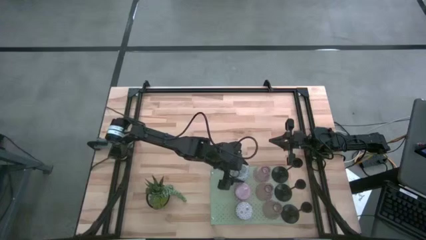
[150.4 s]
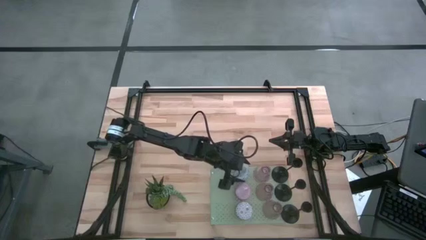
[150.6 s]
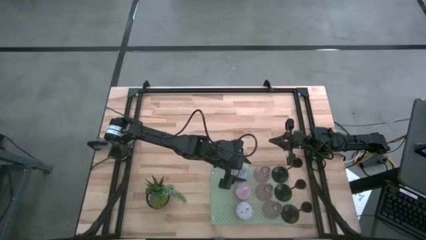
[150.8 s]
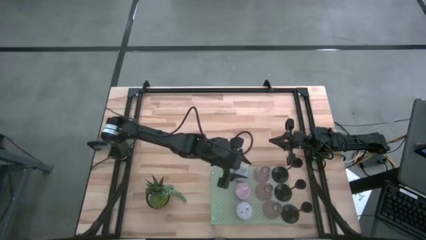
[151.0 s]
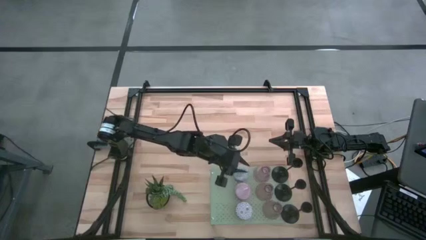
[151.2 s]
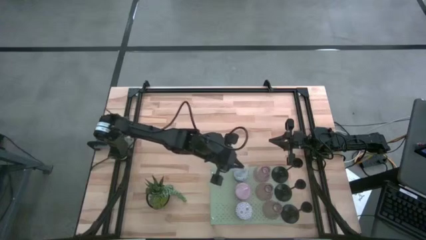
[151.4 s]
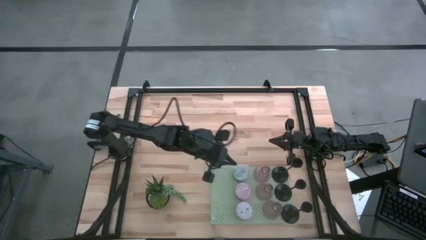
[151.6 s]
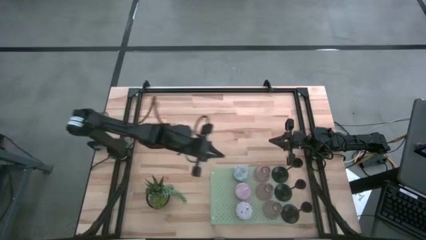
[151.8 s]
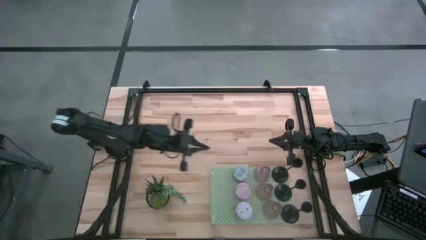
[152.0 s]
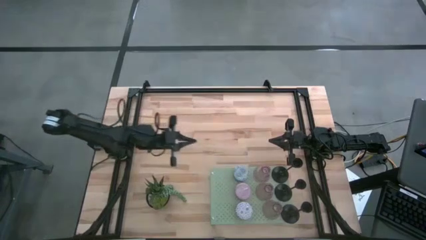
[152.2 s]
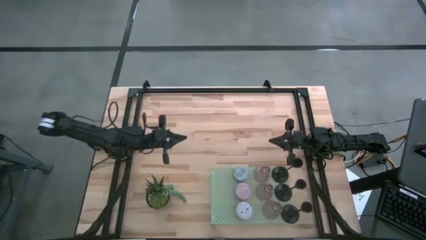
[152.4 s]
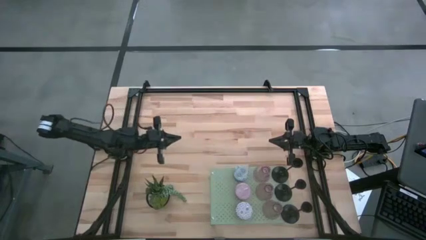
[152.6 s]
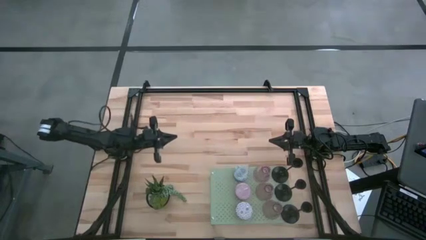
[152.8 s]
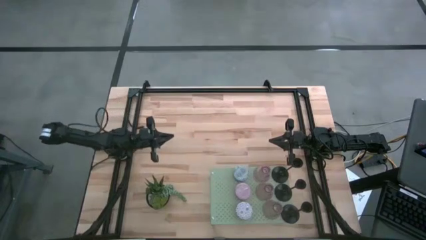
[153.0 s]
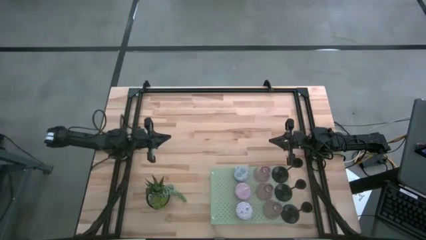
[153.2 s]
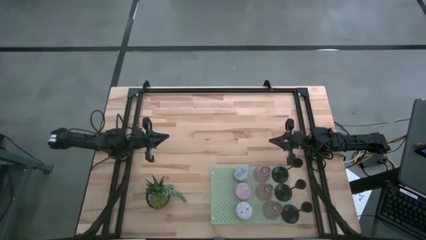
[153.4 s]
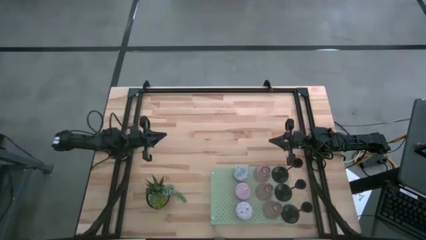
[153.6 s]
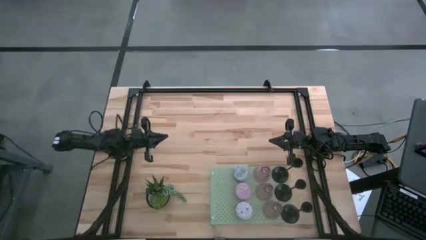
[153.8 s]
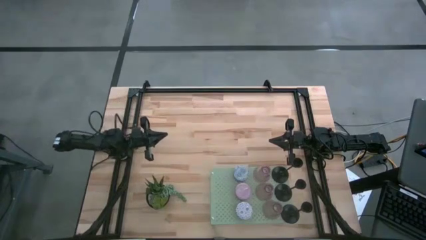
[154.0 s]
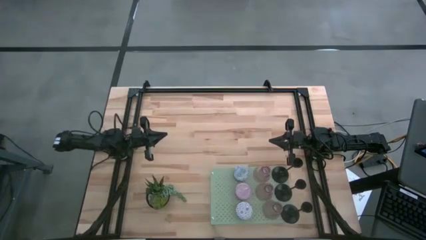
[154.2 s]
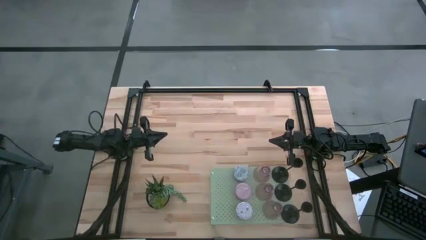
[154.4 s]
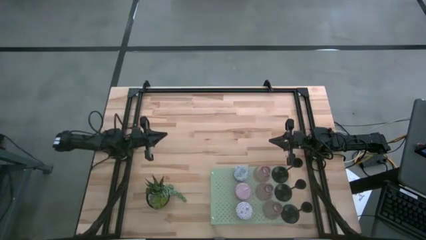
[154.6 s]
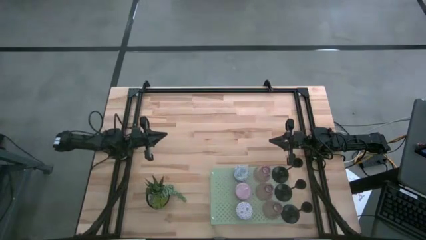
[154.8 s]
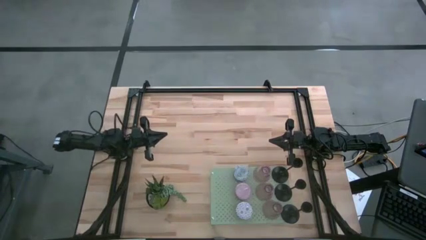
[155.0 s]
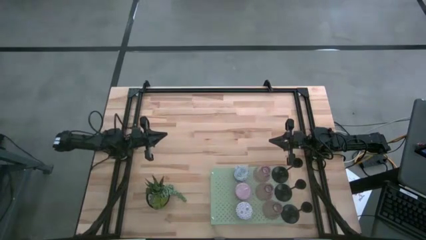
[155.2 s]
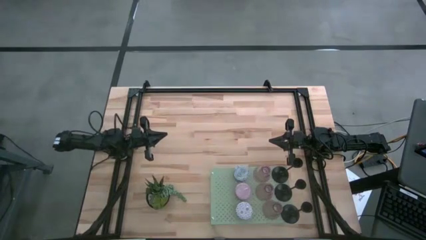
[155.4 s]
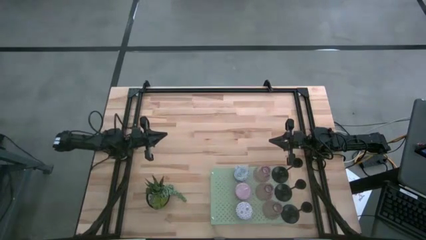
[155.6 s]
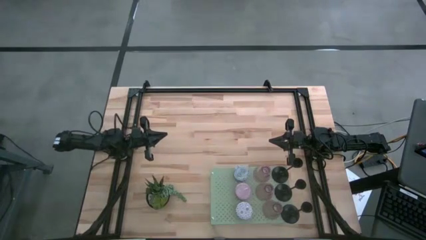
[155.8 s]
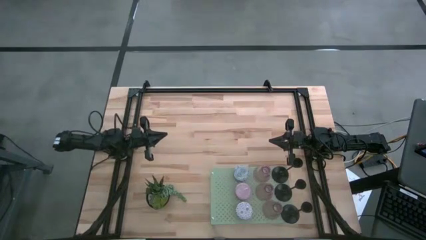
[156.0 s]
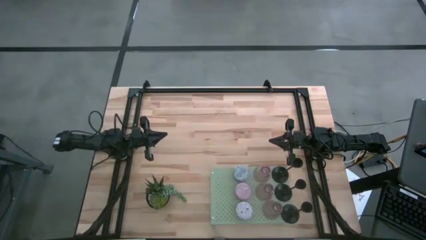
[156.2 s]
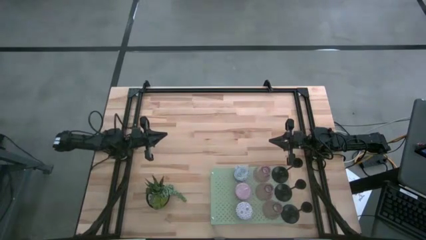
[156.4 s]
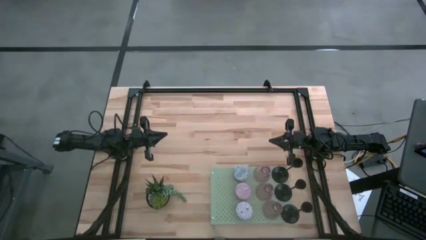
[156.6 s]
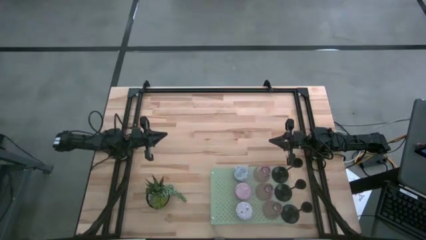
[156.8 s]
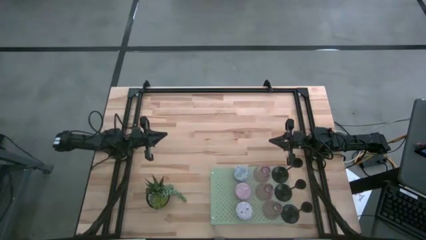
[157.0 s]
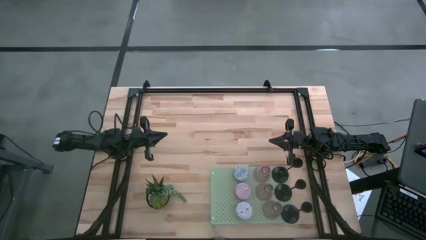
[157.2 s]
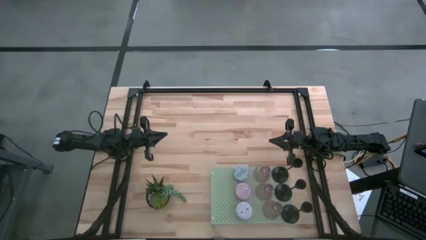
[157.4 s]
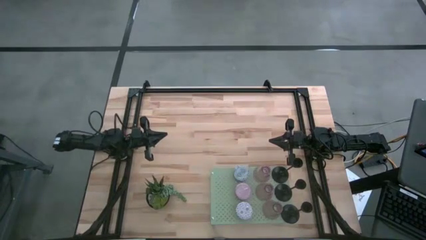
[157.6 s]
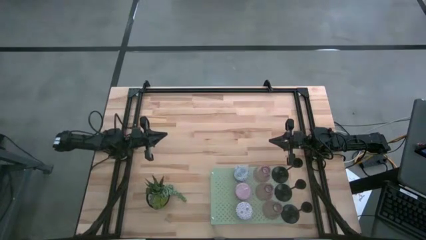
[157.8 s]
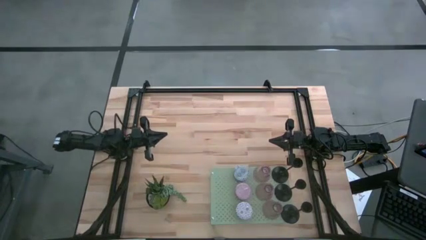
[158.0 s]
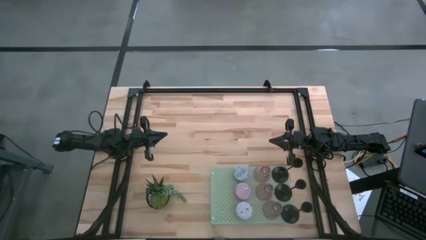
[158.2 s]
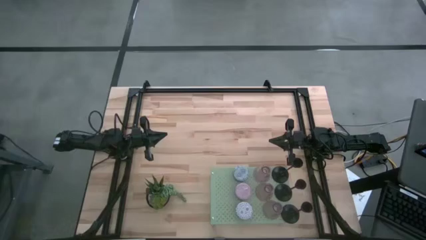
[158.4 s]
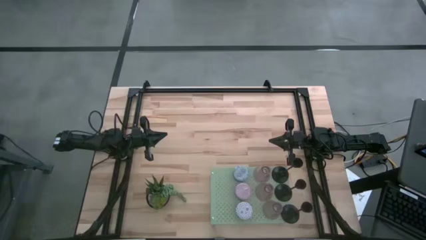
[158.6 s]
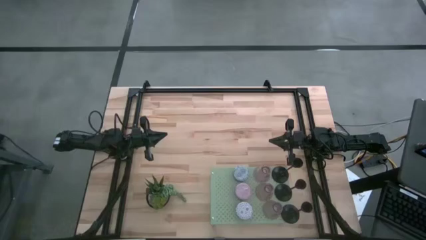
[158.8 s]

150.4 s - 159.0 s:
Task: Pick & Place candle stick holders
Return to Home Position

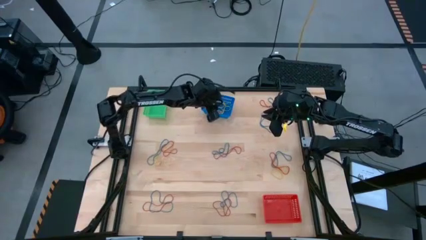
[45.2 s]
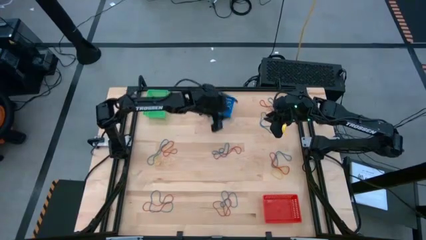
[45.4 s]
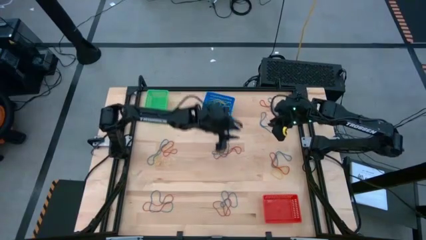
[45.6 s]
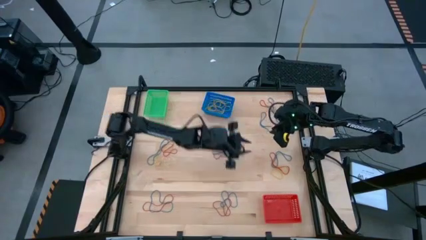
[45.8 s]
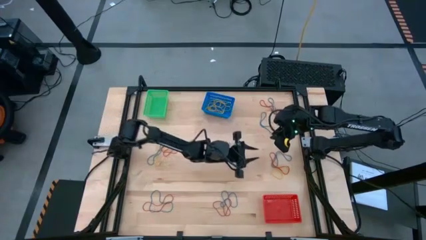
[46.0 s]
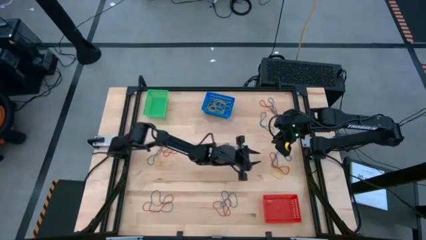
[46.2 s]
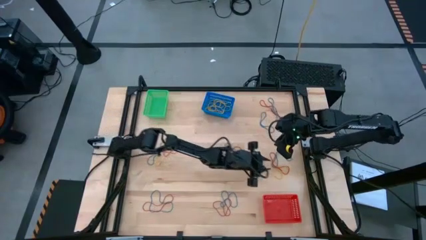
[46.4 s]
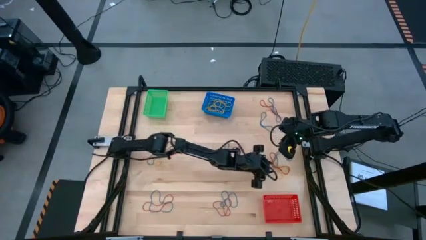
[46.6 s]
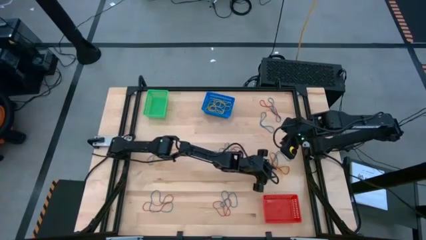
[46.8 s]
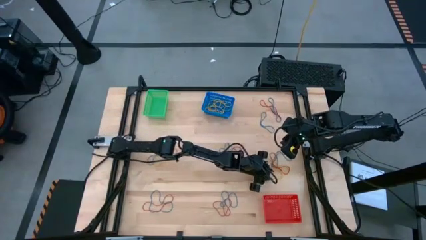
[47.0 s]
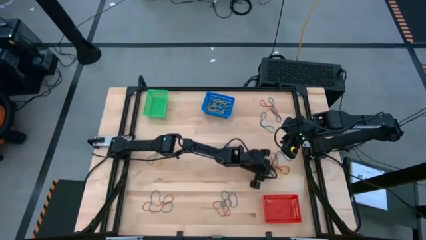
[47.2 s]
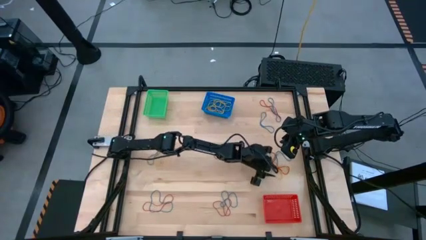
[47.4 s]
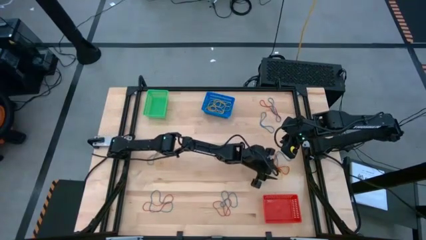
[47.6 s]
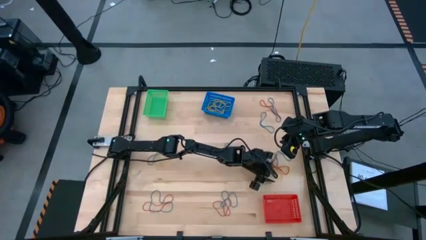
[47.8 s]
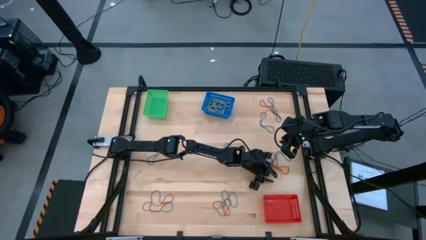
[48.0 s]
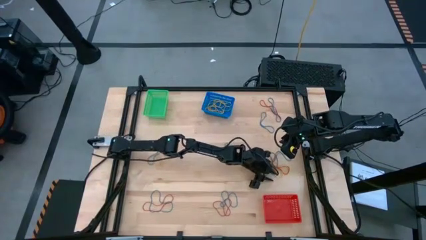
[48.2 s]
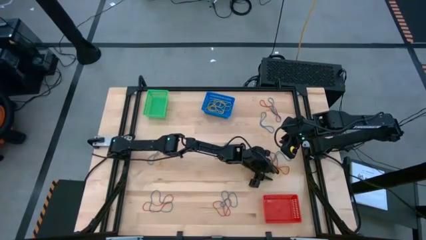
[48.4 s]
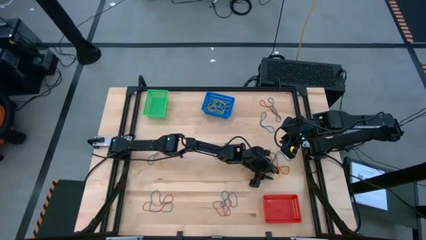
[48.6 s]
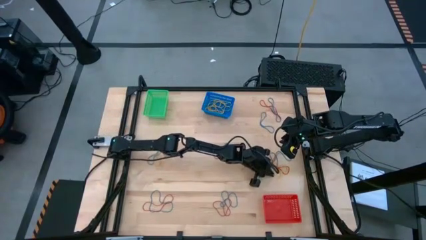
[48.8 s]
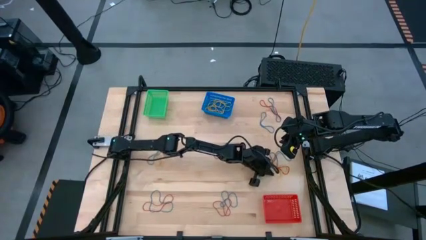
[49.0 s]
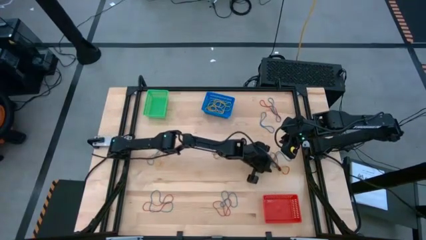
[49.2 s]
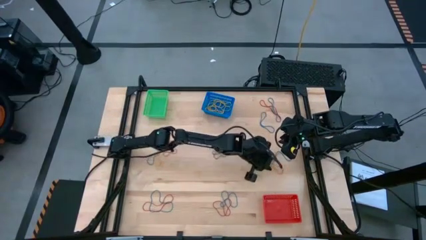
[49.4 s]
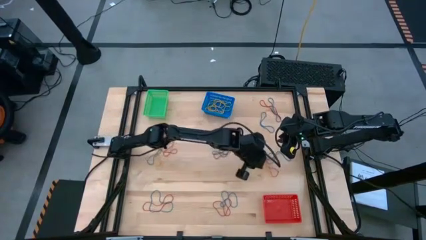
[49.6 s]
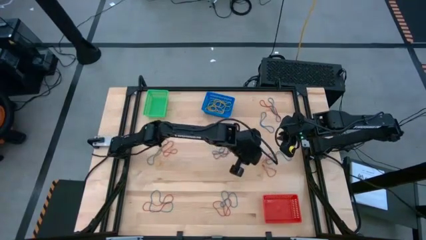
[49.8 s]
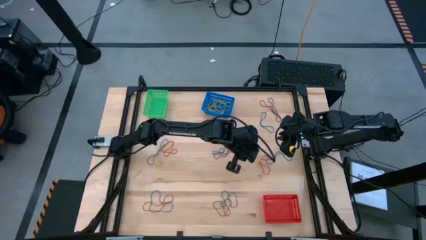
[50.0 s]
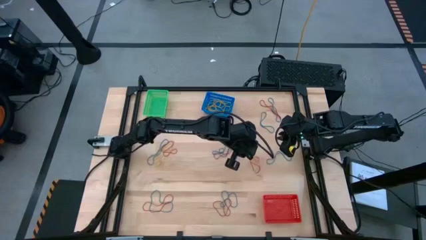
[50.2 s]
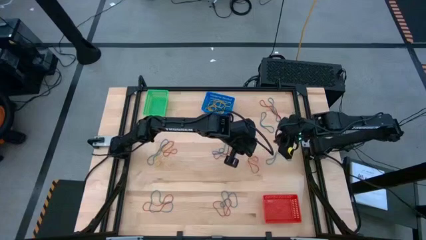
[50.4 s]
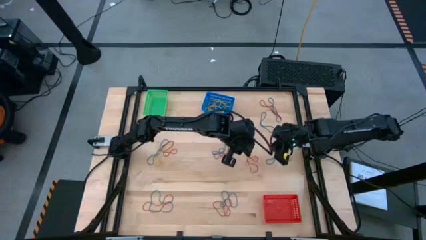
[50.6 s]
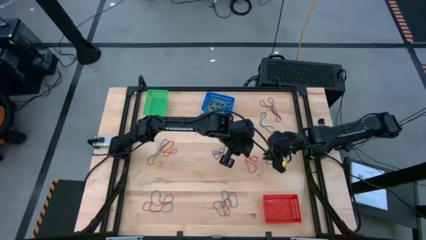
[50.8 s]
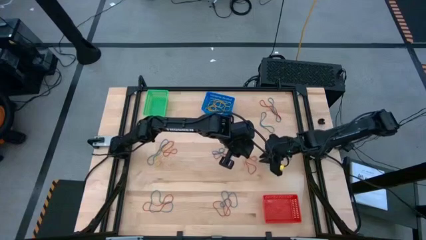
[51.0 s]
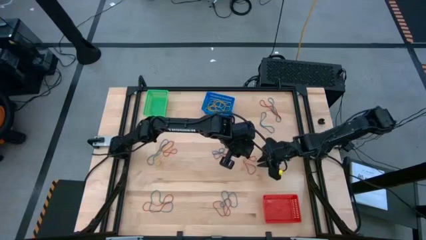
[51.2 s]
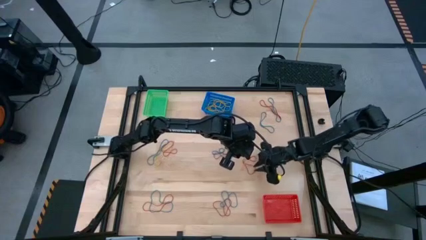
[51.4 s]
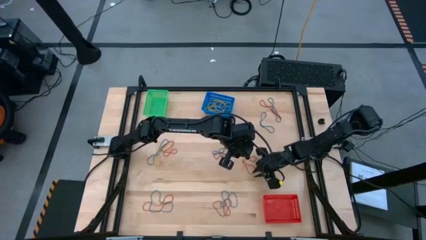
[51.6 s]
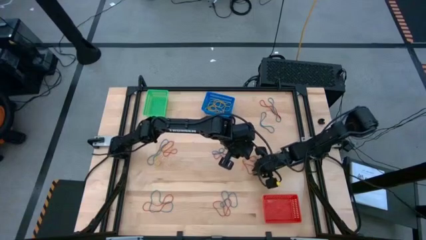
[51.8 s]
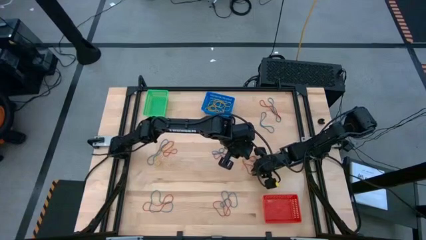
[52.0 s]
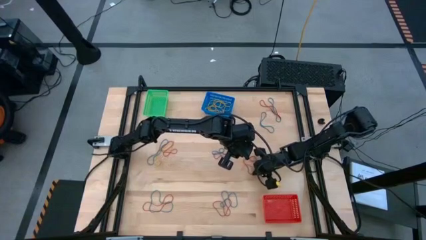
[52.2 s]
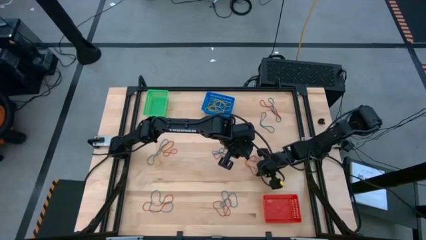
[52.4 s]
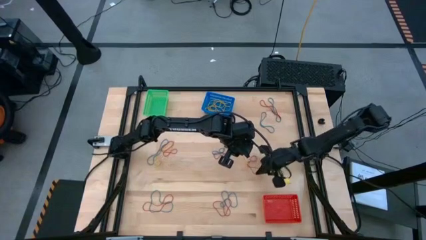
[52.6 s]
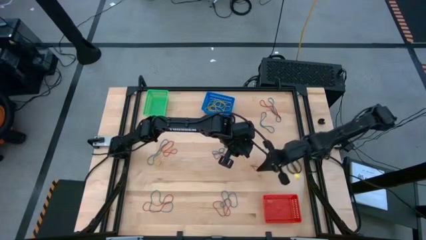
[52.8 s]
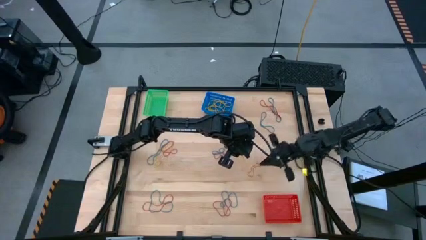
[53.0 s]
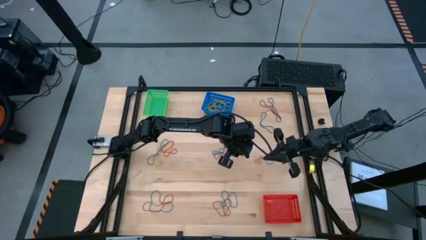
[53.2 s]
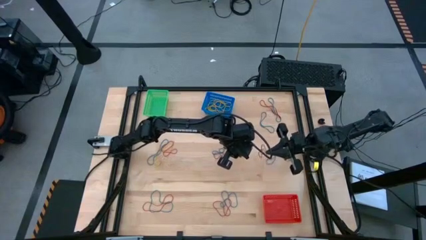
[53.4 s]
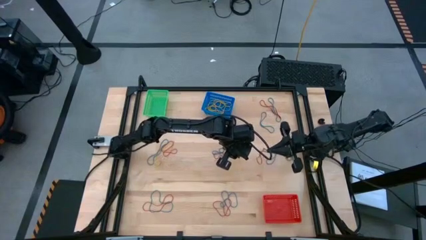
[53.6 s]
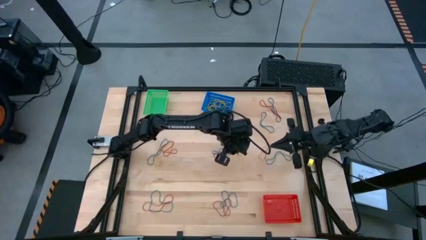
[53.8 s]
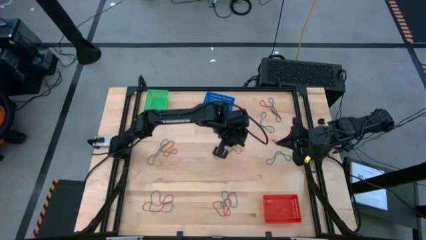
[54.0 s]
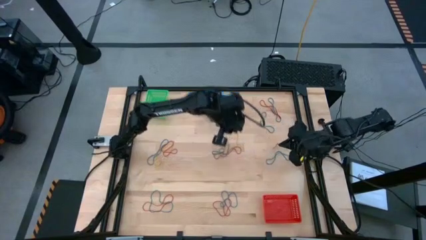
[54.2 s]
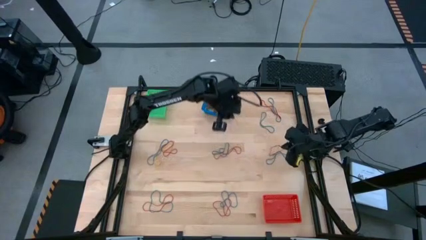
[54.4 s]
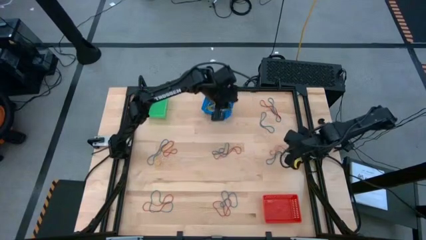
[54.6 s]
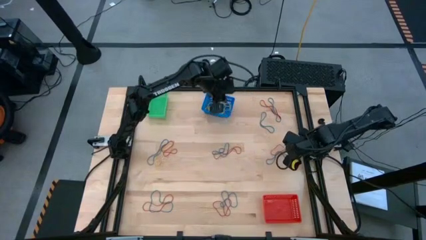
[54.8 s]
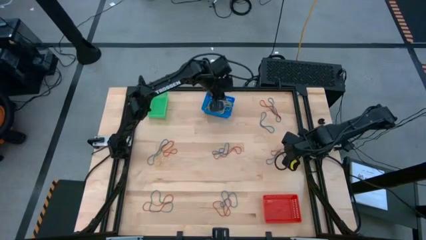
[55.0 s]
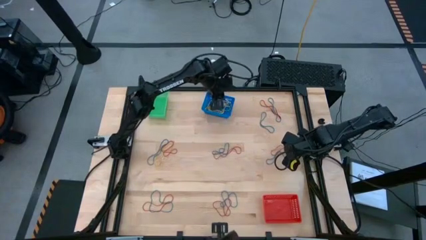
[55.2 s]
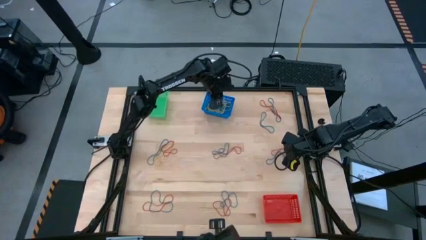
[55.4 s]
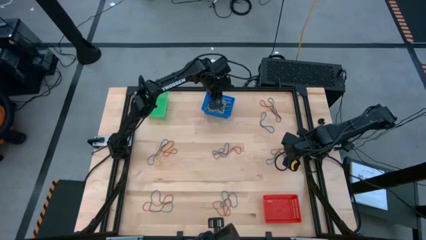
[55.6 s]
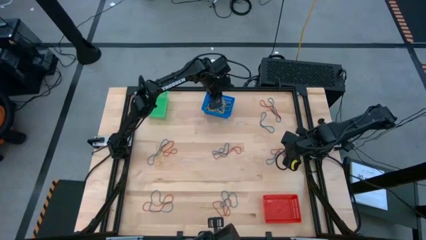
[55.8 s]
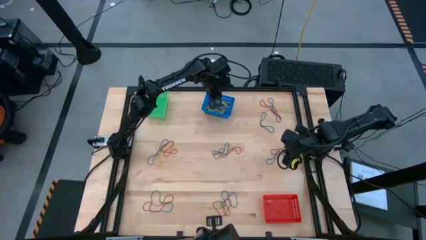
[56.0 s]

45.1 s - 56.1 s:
Task: Sort rubber bands into baskets
Put the yellow rubber band into the blue bin
